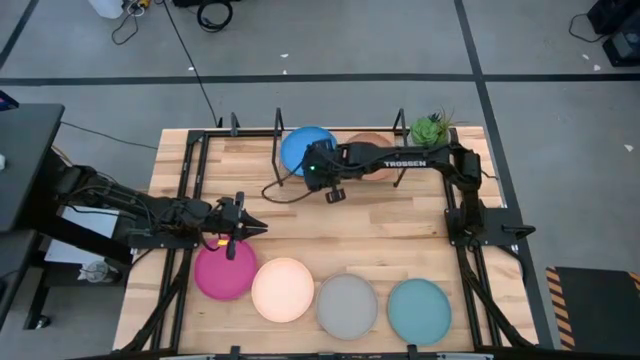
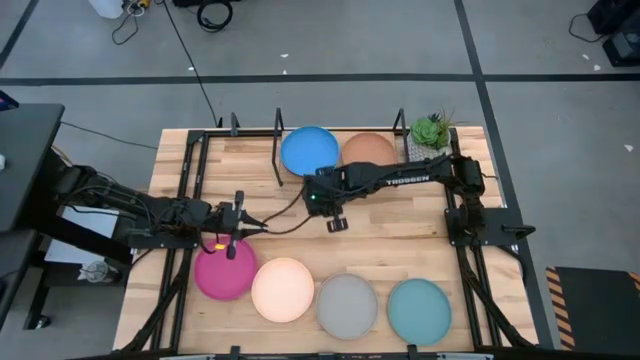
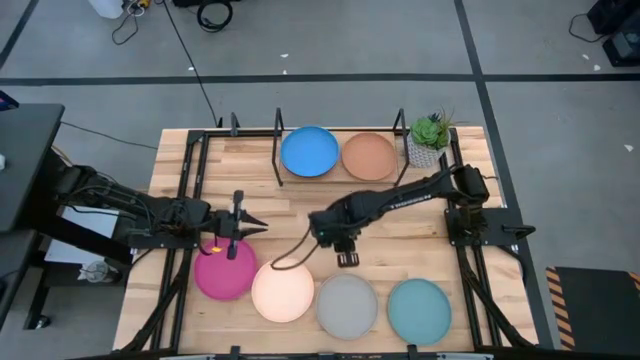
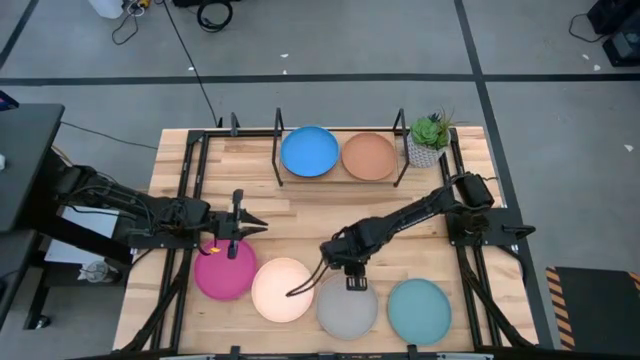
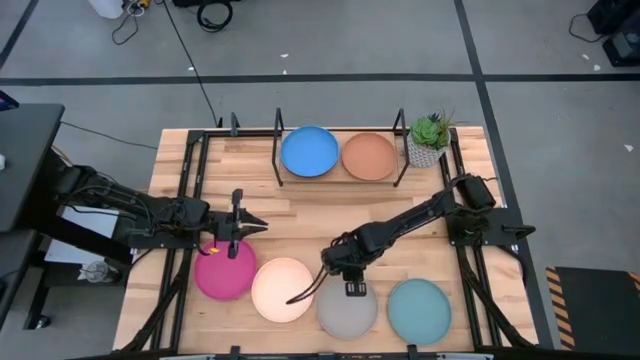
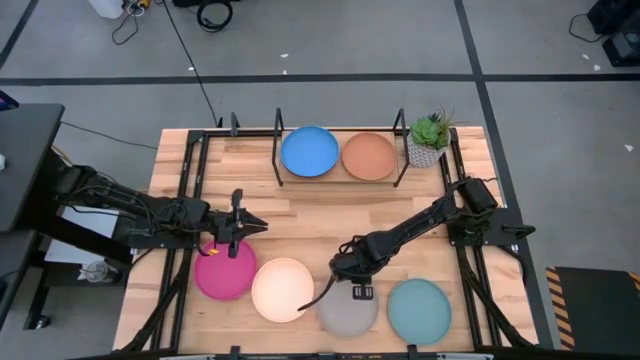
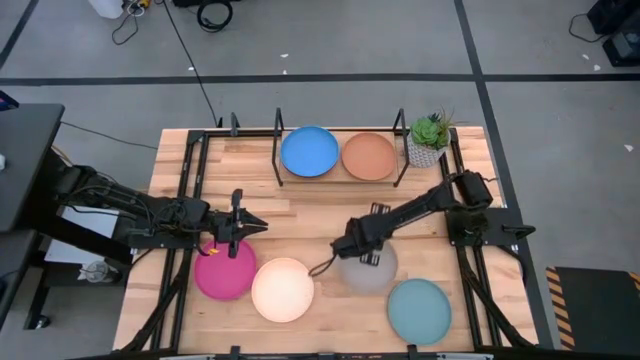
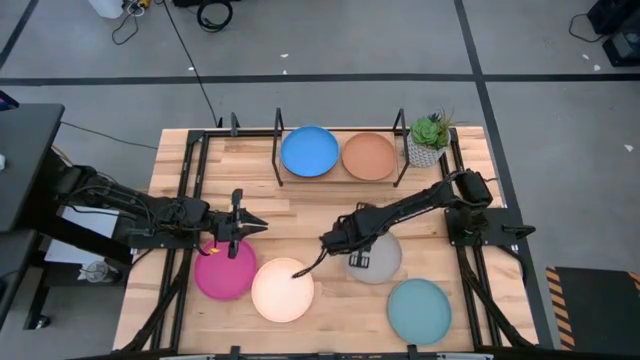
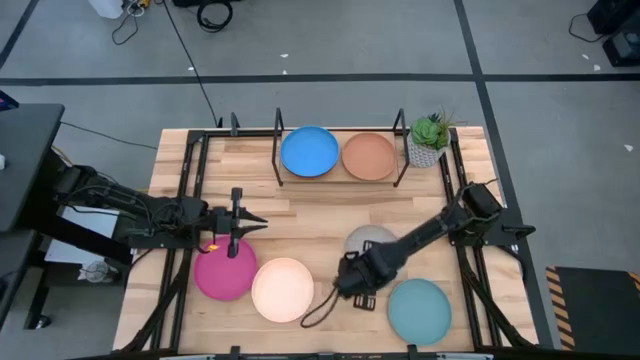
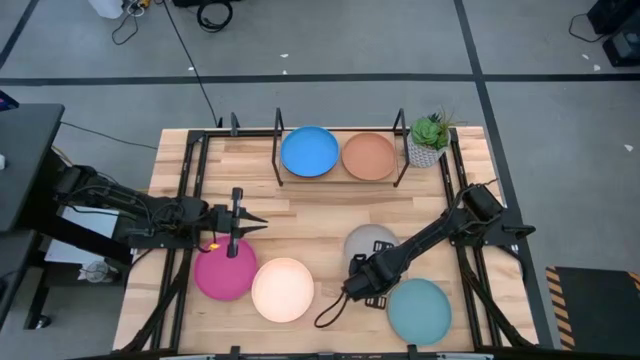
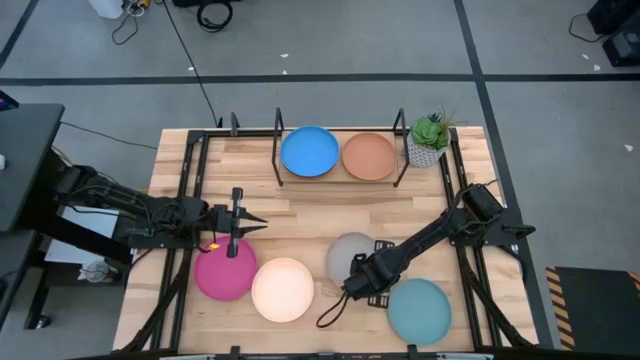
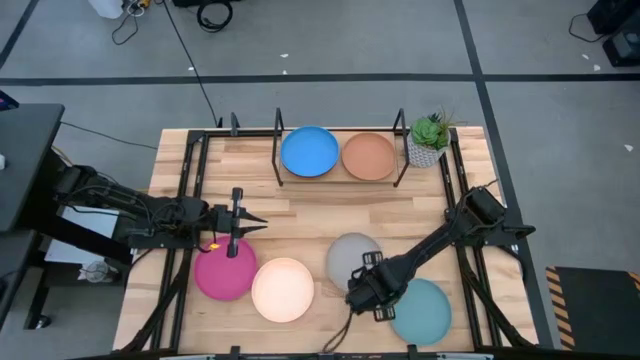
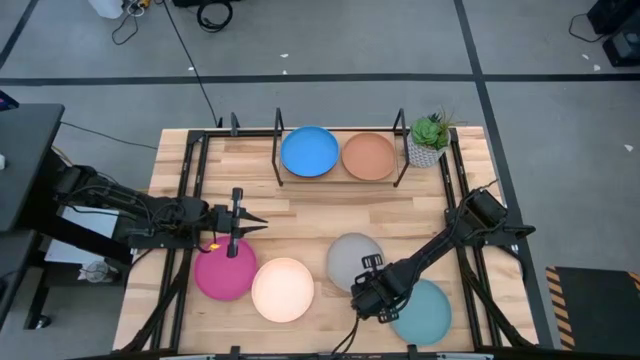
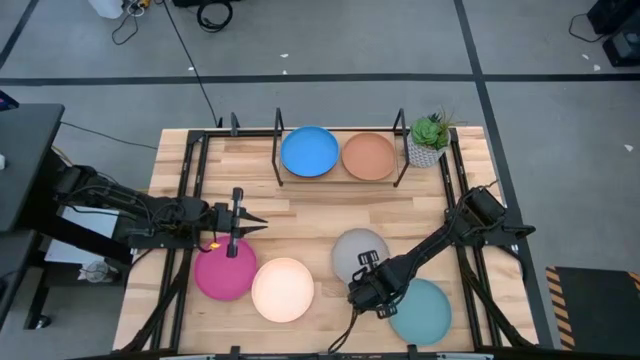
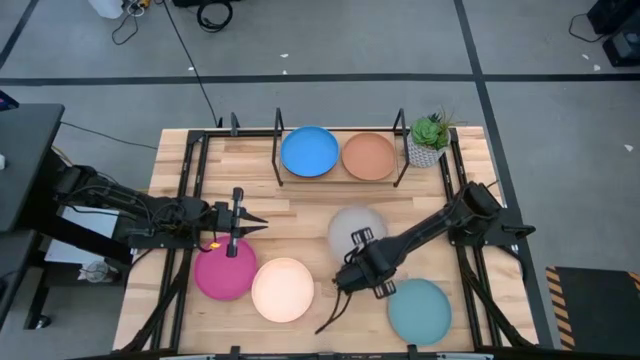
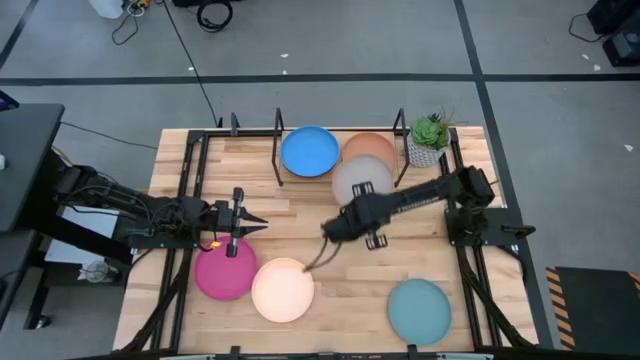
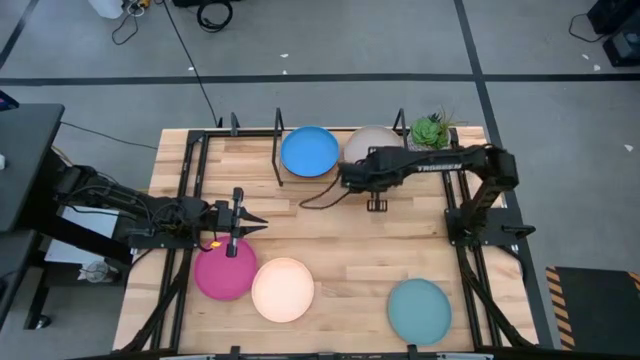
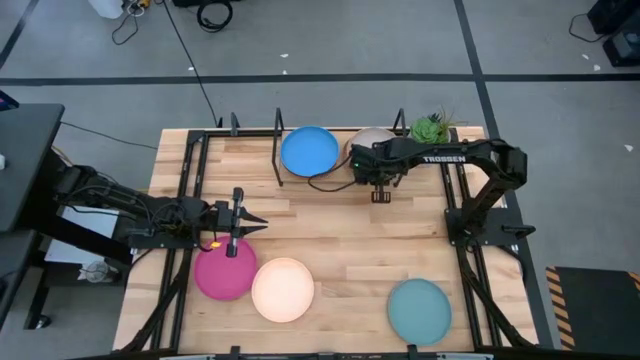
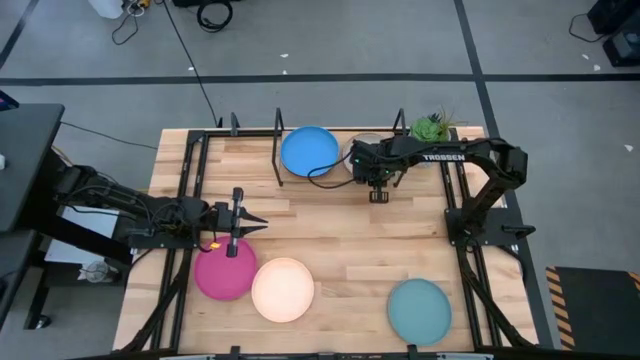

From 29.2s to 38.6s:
Task: Place and stack plates onto a shelf
Stack the gray plate on the top of the brown plate on the shelf

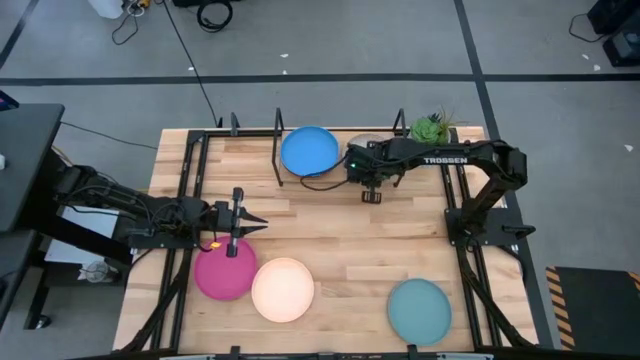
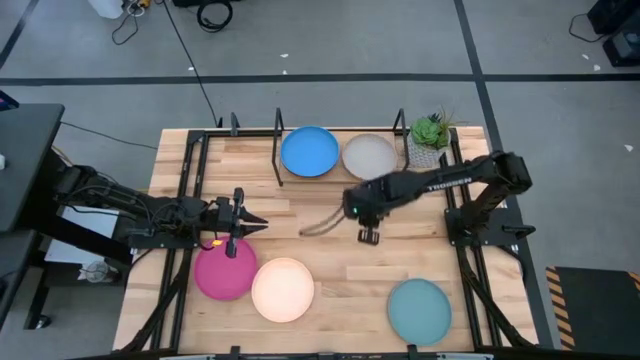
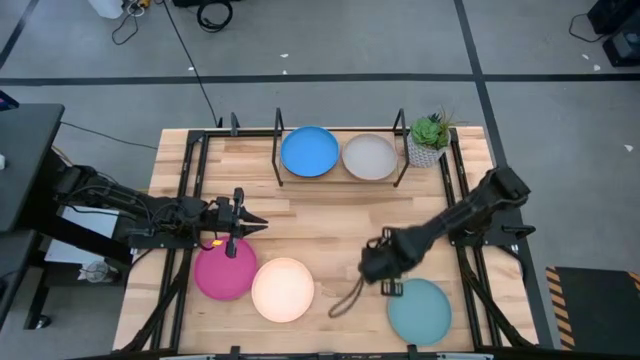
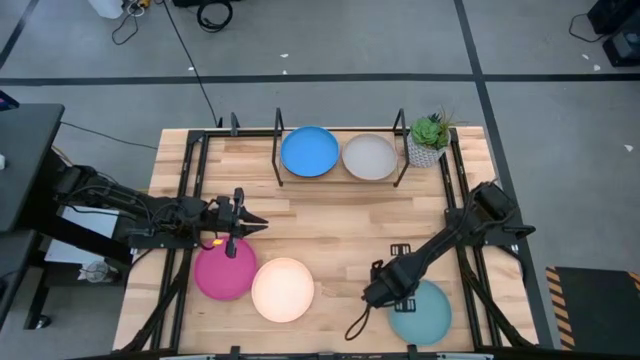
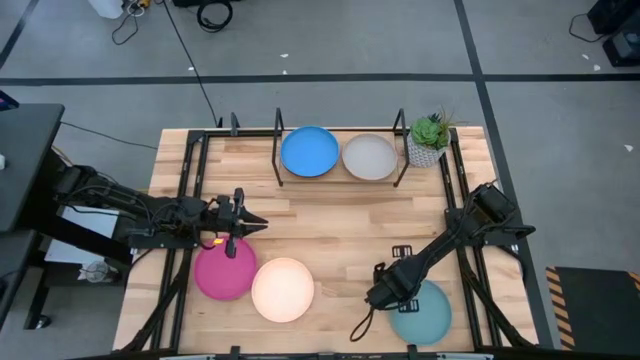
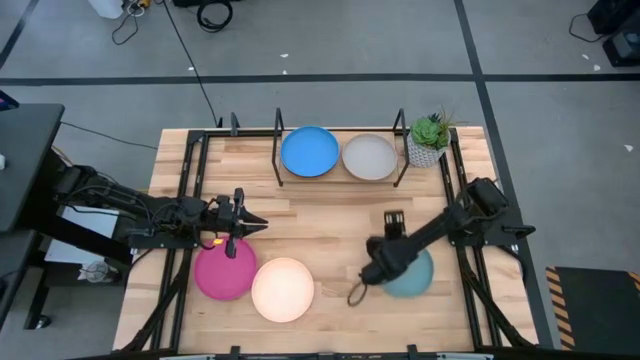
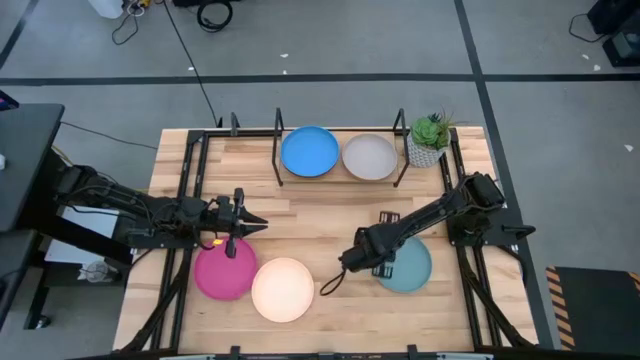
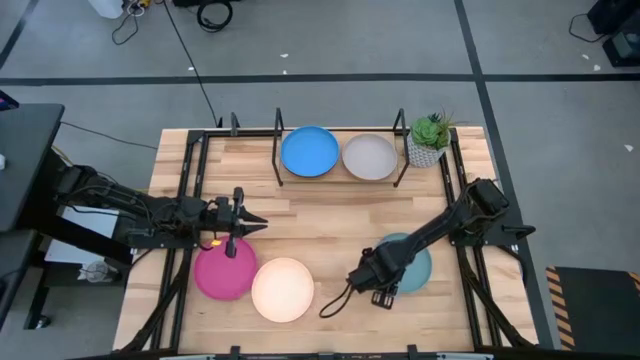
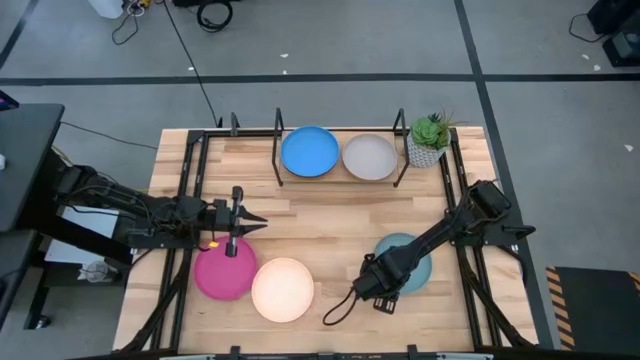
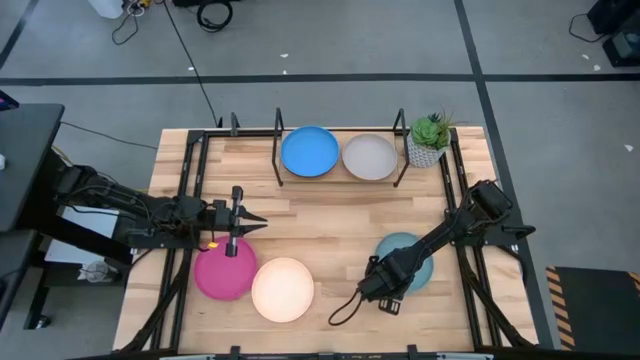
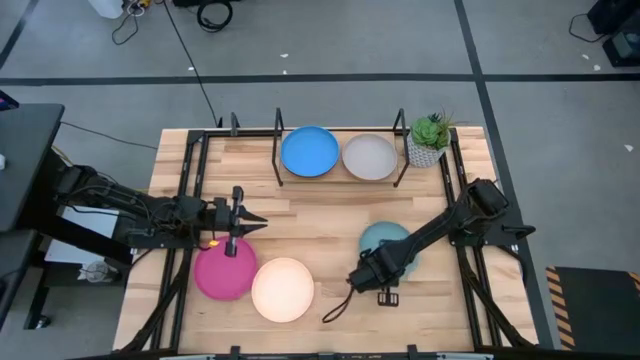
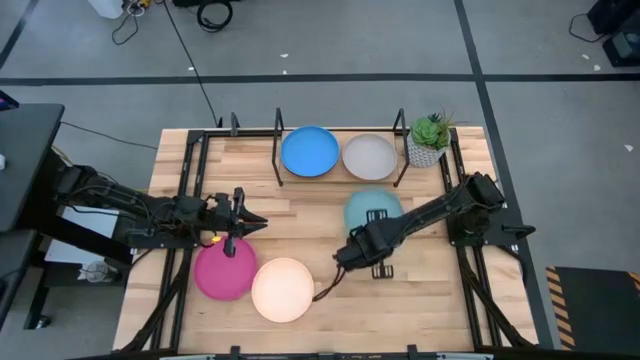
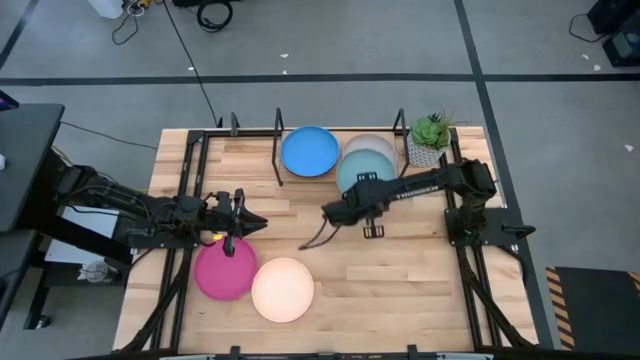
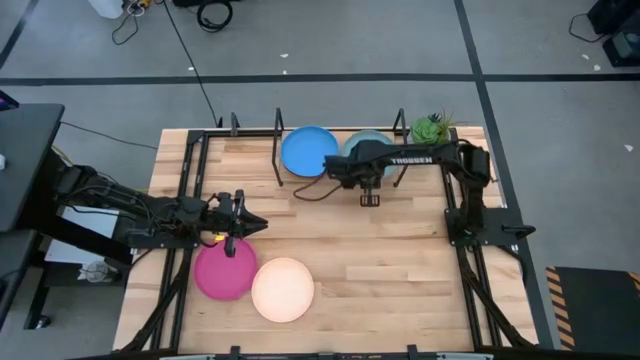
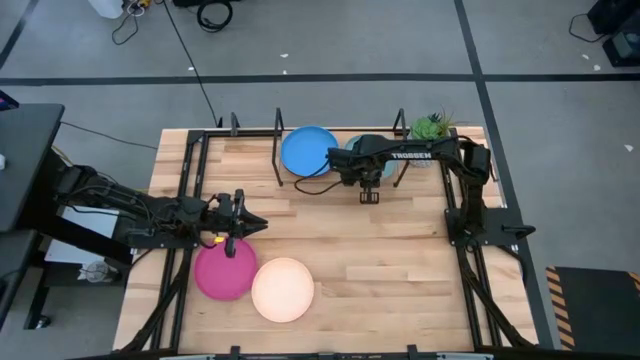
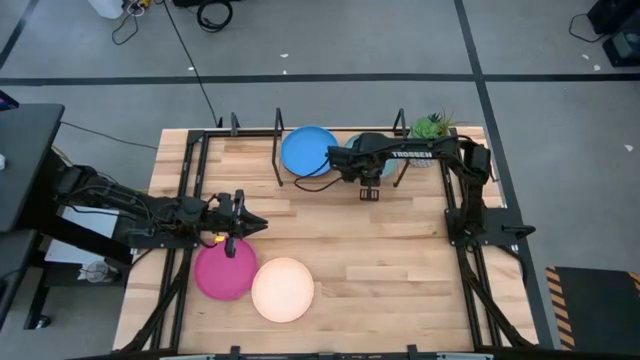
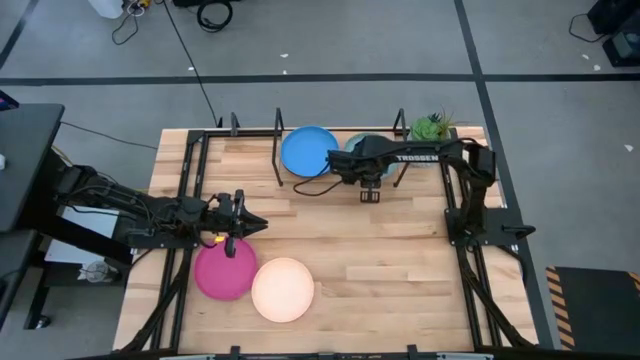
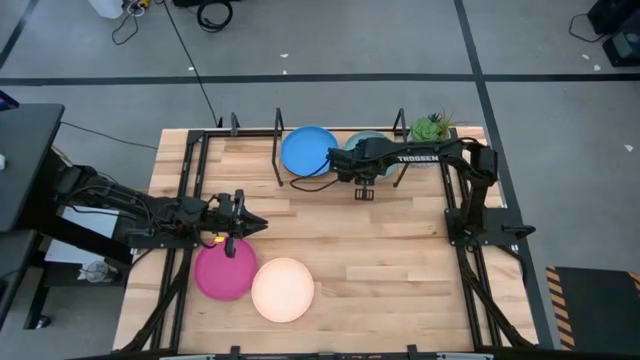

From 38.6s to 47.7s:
Stack the light blue plate on the top of the stacked plates on the shelf

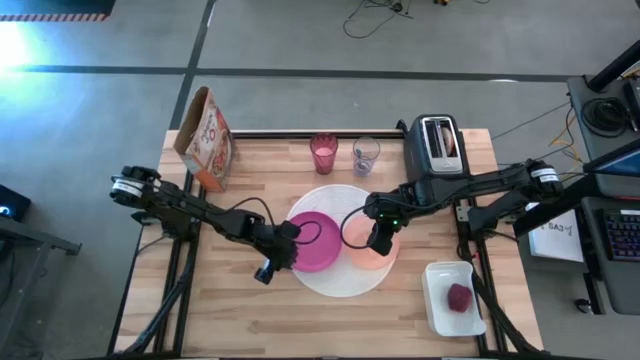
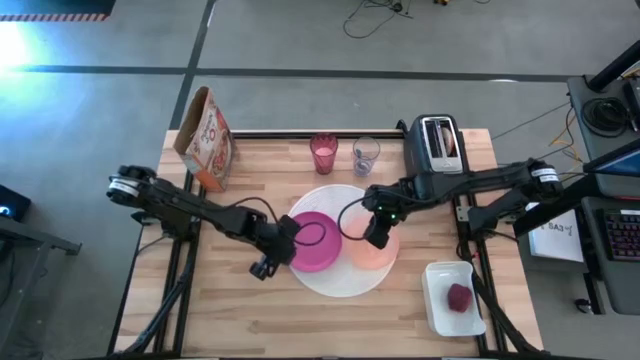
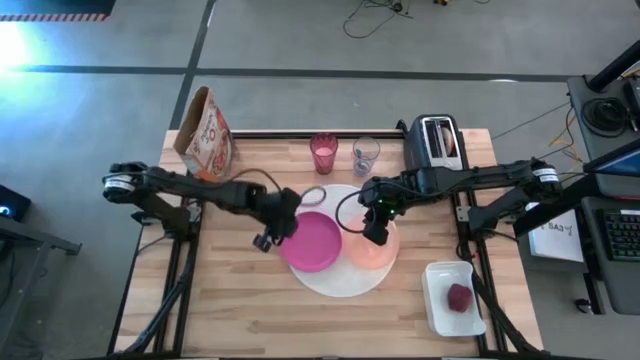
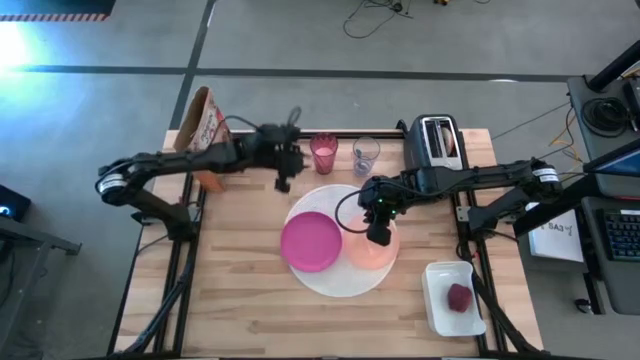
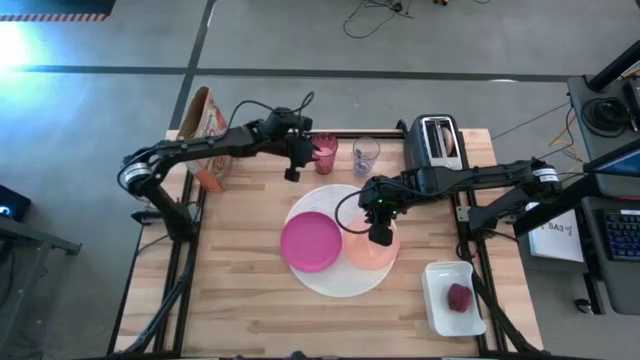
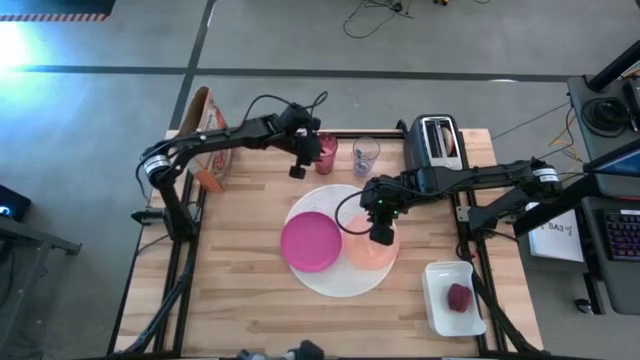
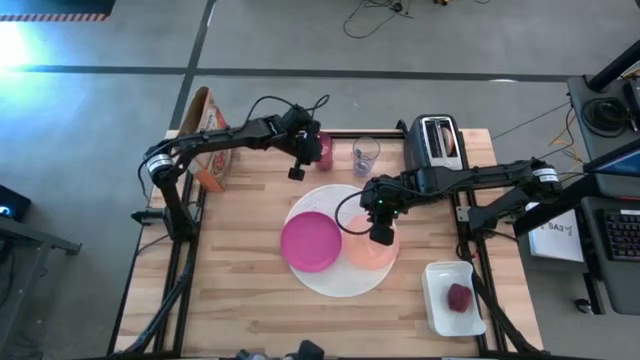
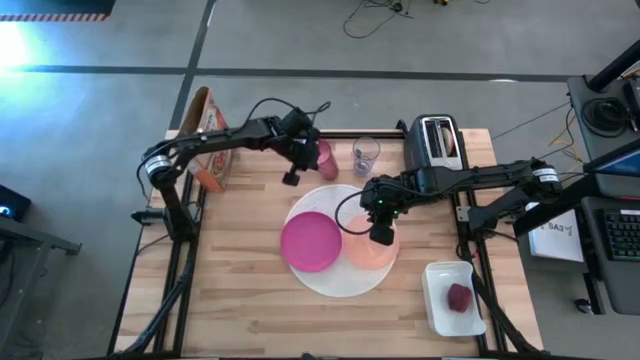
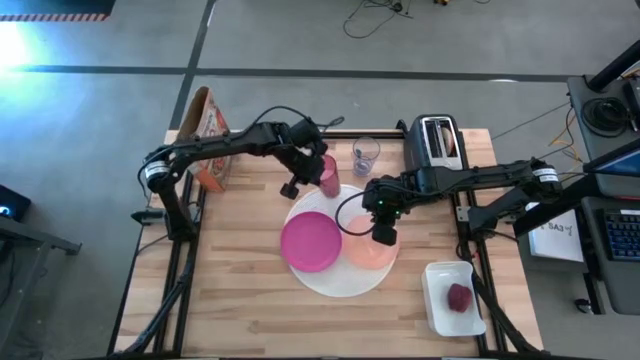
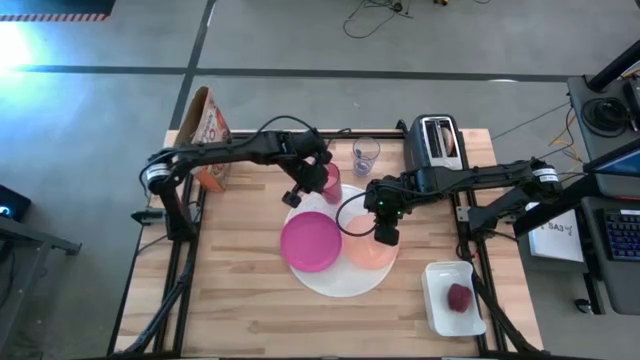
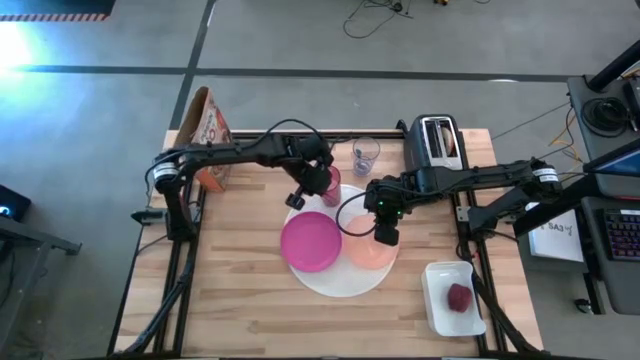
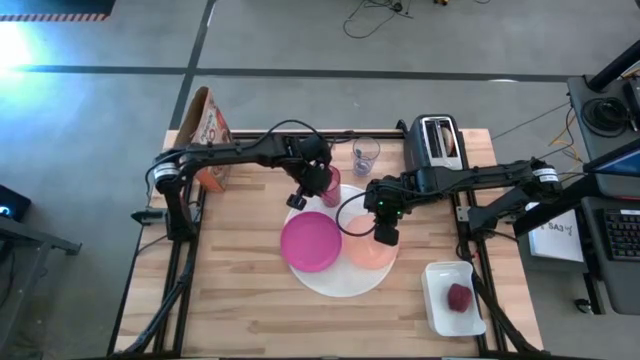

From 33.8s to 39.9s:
Task: Arrange a breakfast setting
Put the red cup to the top right of the pink plate on the table mat
